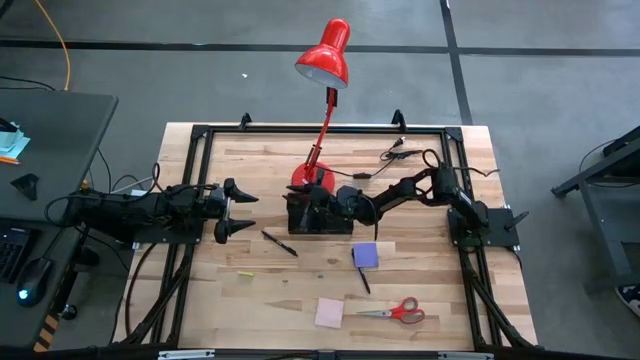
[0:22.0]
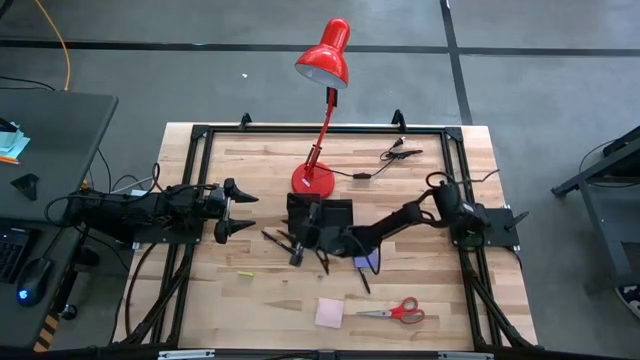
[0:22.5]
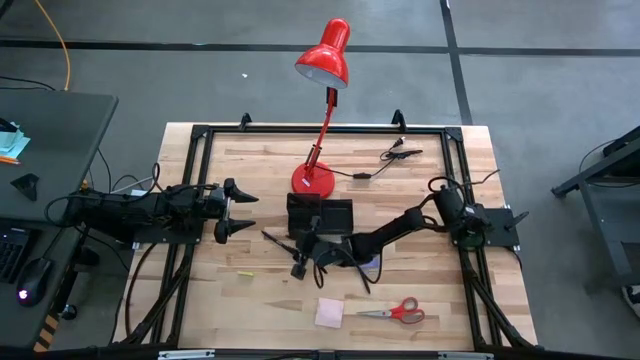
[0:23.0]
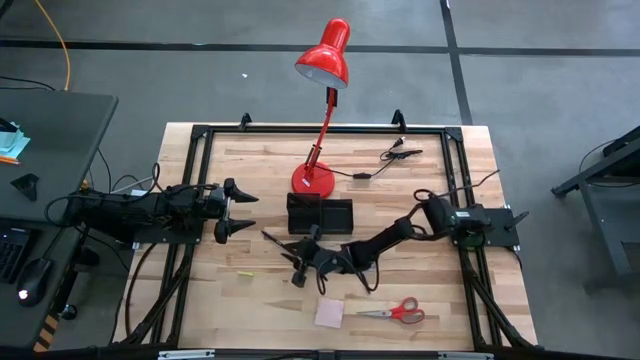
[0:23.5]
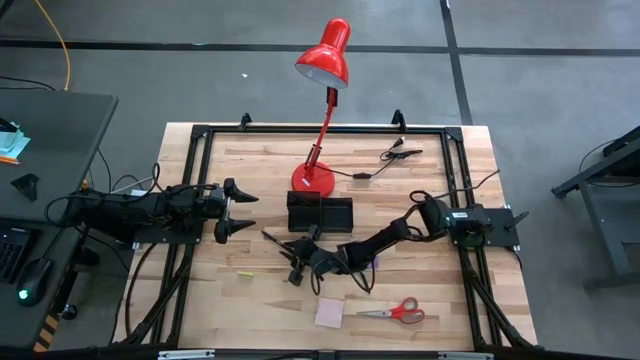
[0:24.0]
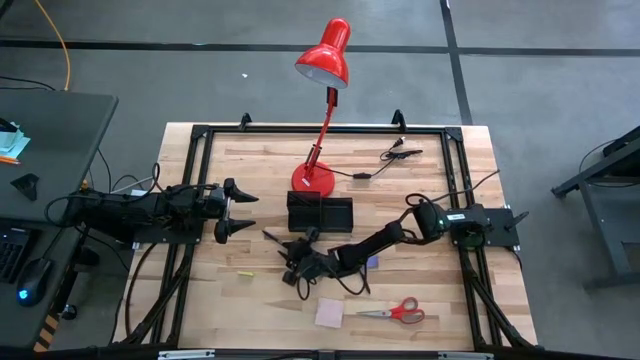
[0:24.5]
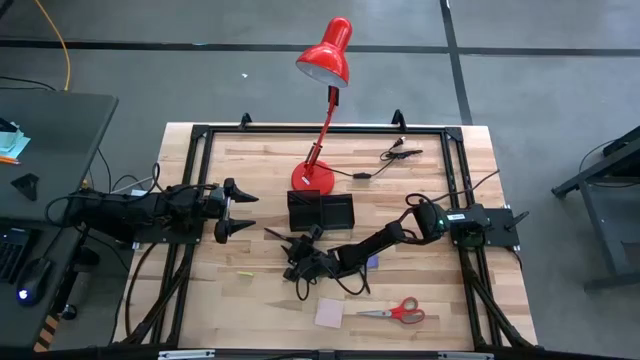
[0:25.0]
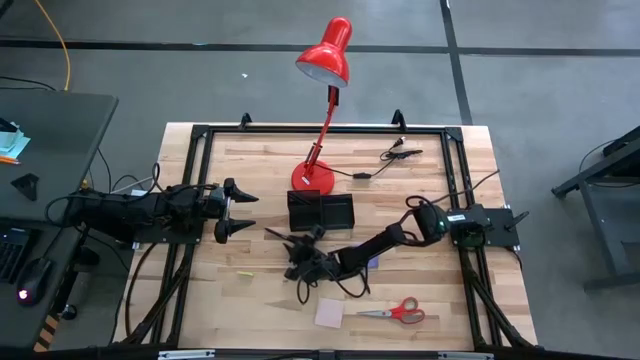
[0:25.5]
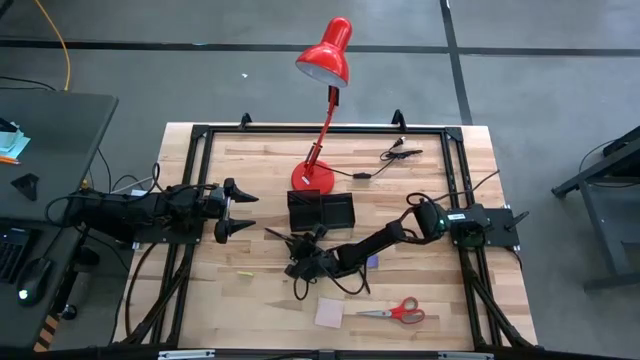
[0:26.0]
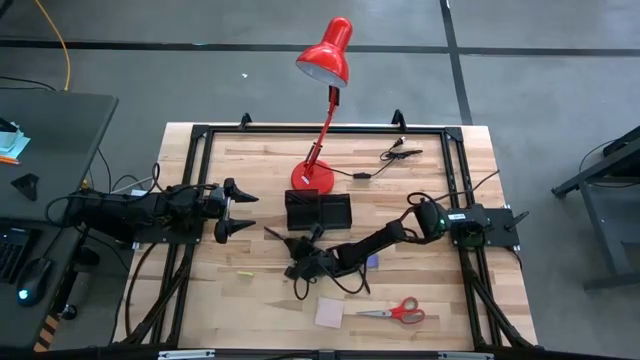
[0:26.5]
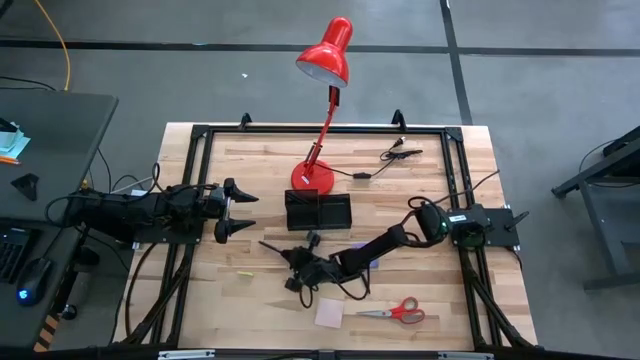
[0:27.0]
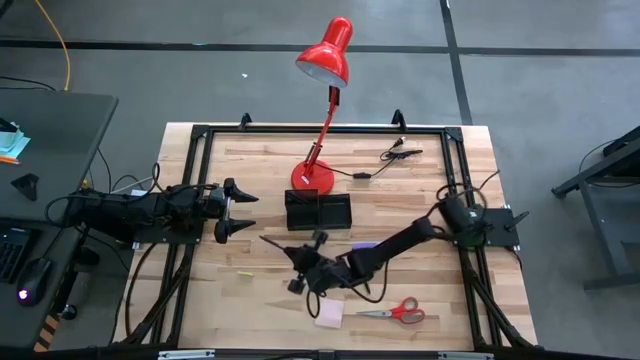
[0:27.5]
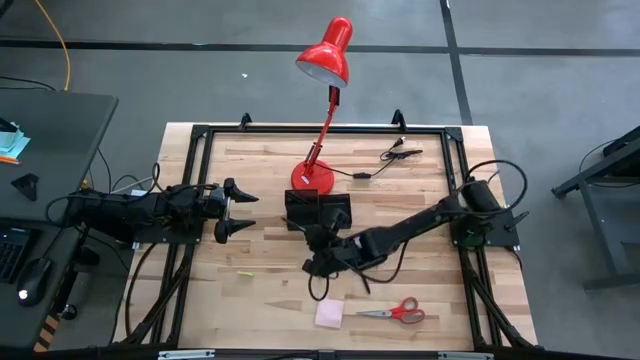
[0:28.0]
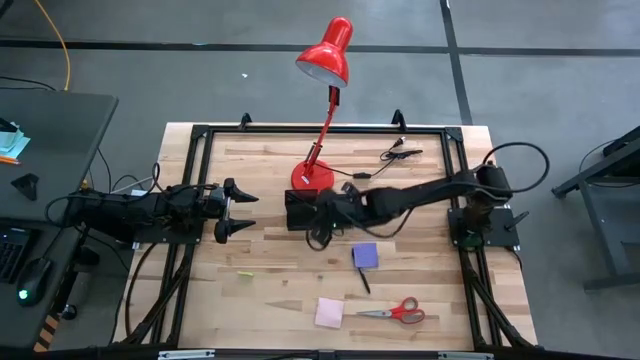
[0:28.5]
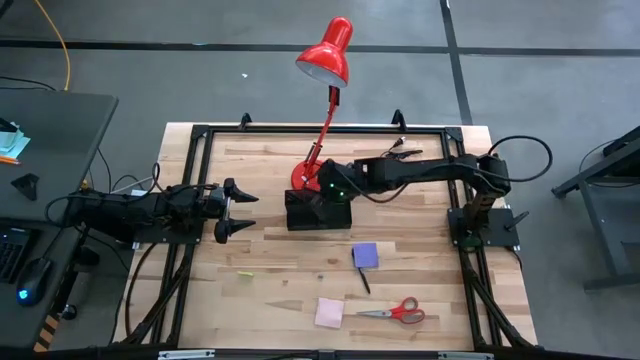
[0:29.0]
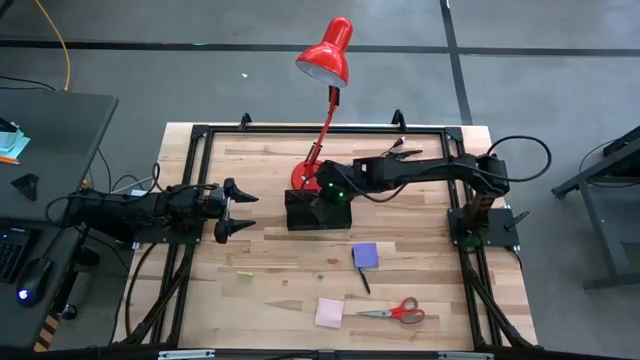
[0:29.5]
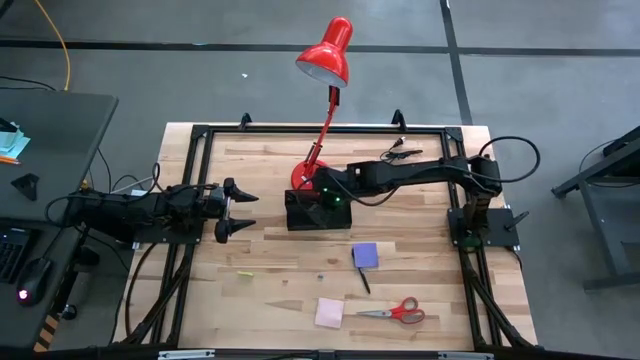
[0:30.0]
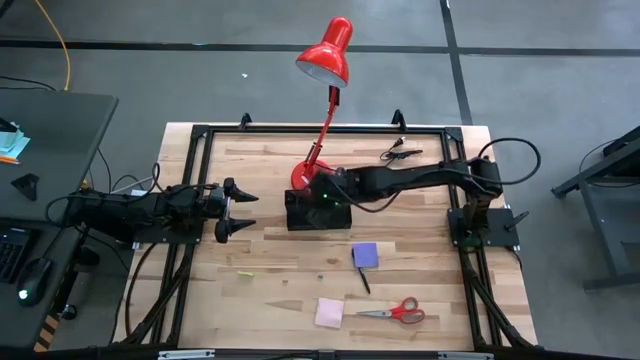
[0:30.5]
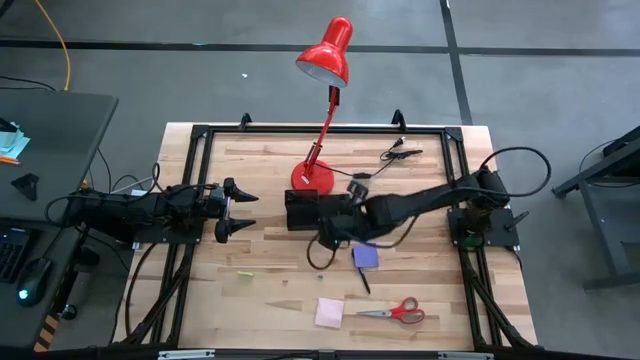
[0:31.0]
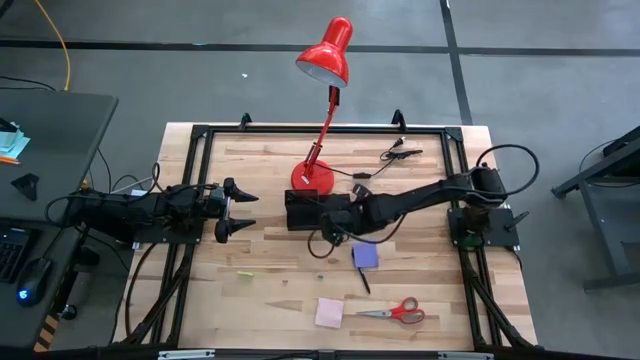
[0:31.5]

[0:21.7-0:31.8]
Task: Pick and place office supplies into organizer
Put the black pen into the black desk organizer

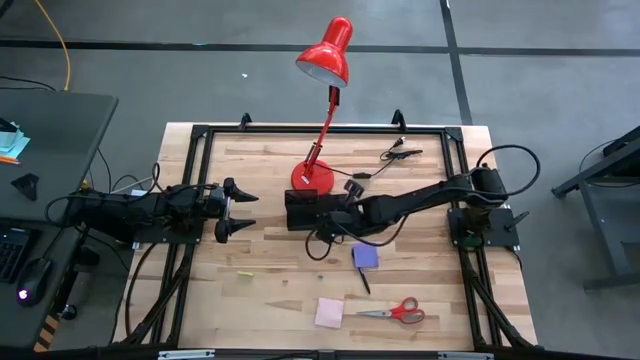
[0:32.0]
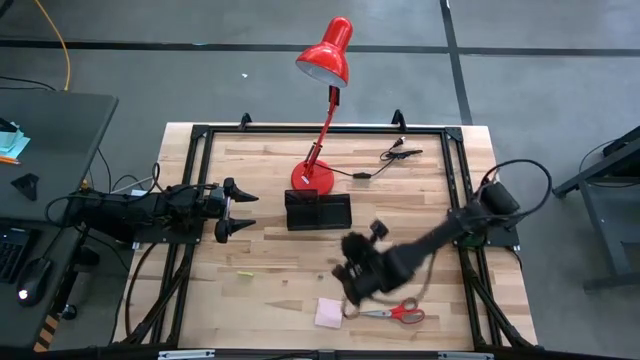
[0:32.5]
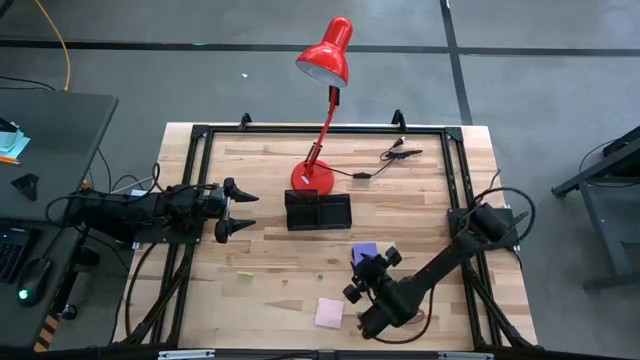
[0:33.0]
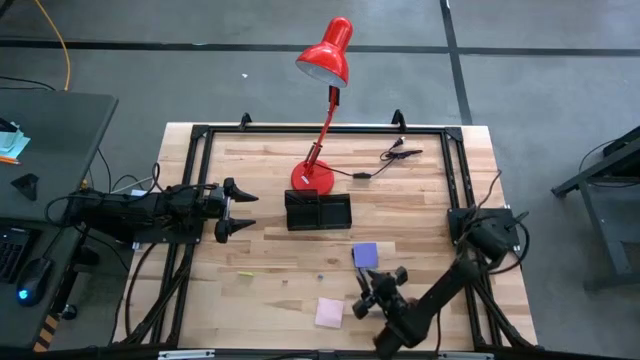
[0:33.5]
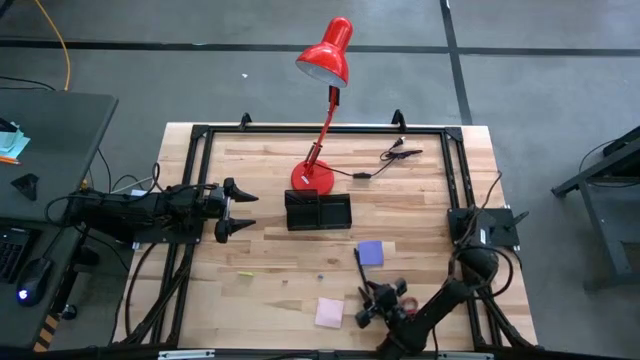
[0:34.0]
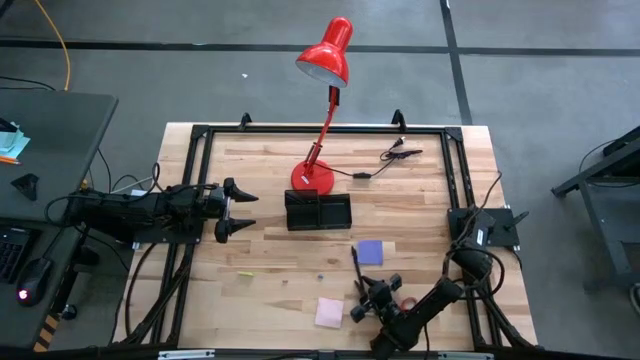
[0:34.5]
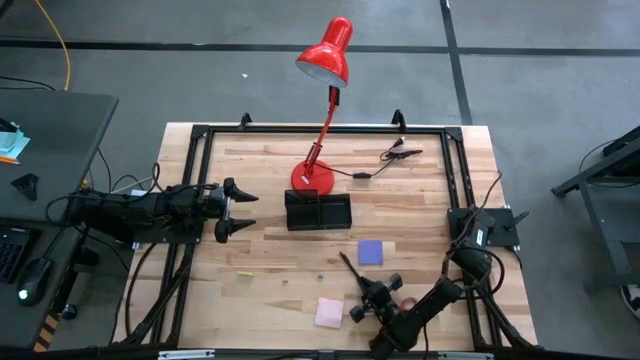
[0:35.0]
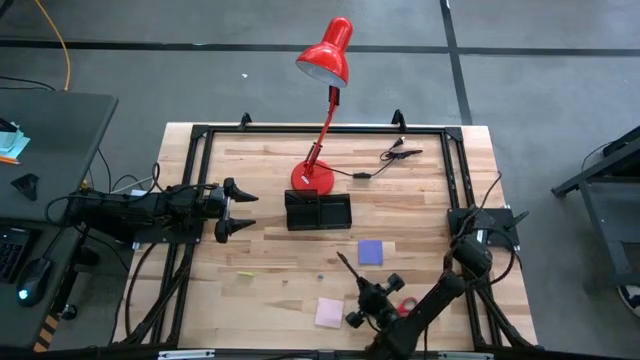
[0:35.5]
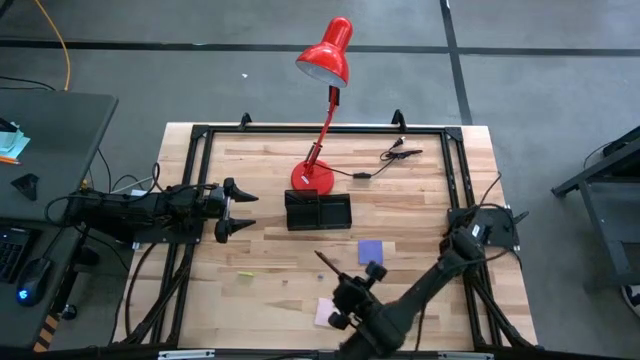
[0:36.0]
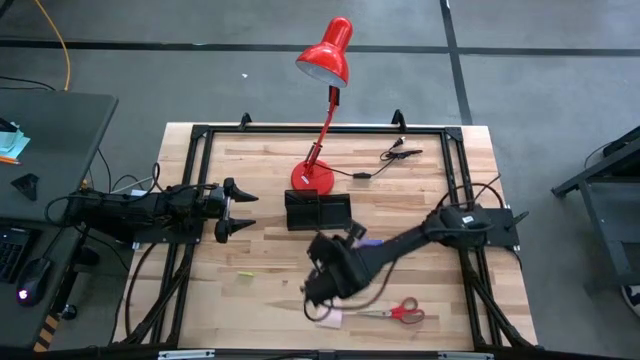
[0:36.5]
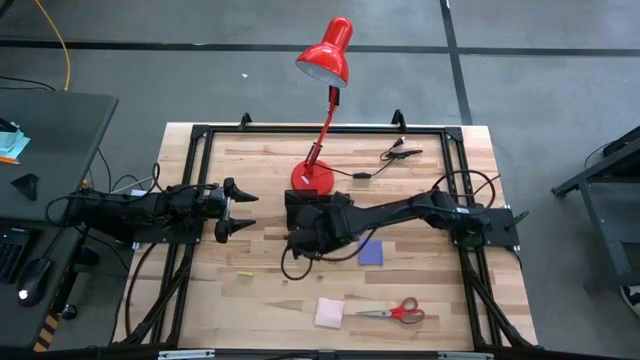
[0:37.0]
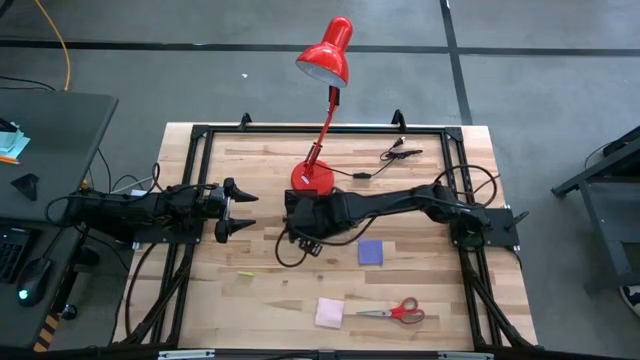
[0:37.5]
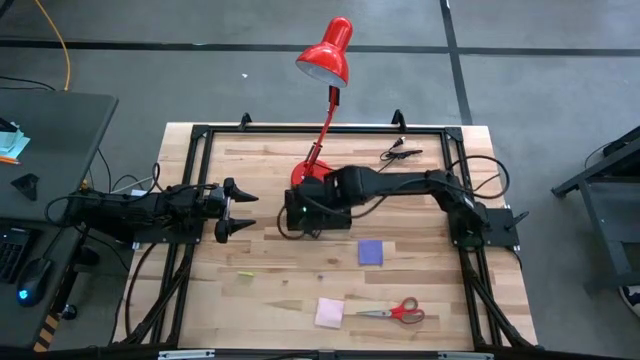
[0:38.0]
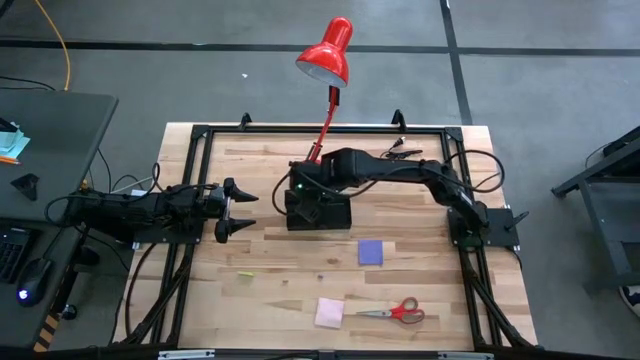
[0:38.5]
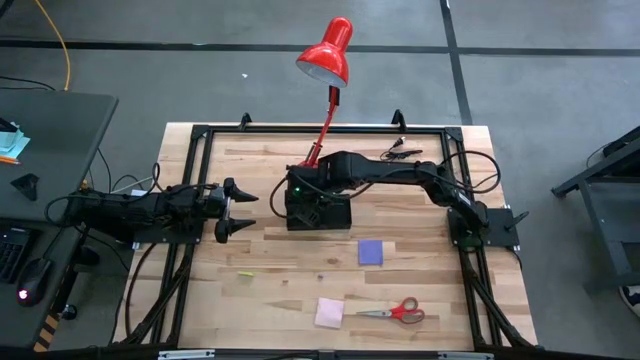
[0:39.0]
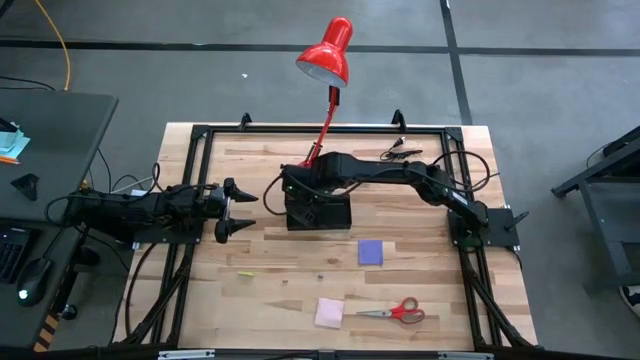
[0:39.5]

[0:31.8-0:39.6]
Put the black pen into the black desk organizer

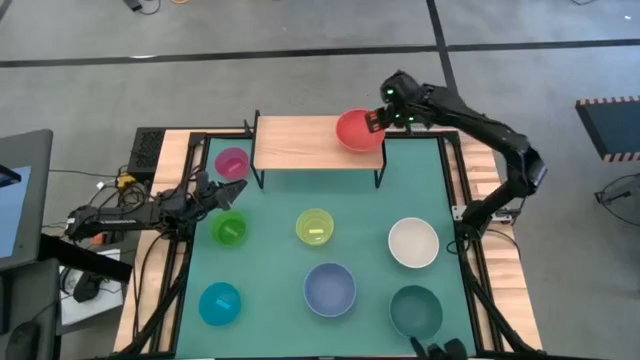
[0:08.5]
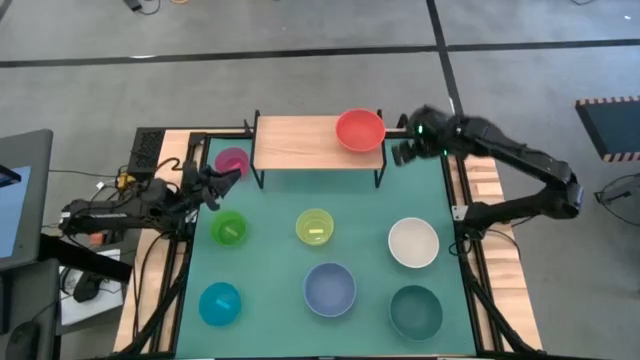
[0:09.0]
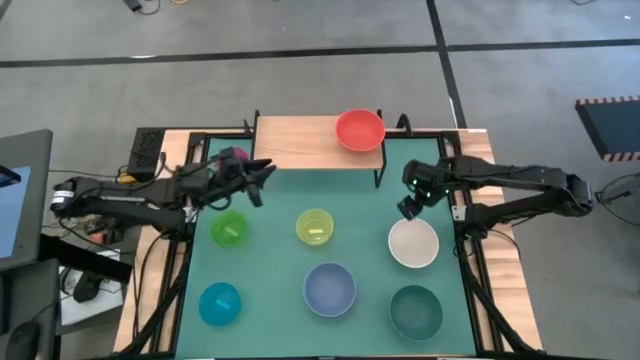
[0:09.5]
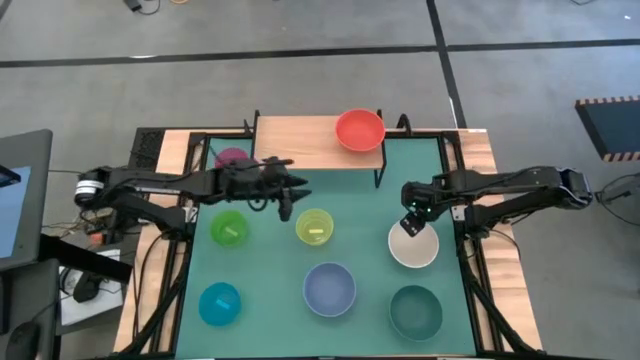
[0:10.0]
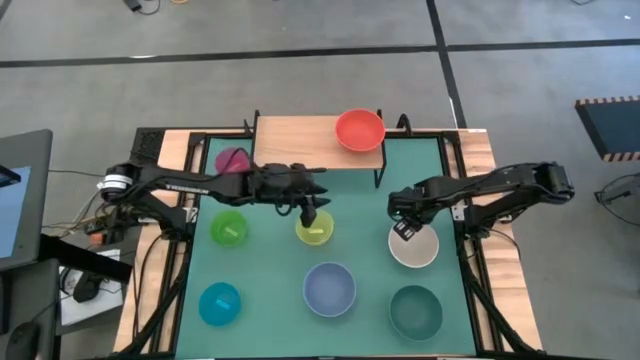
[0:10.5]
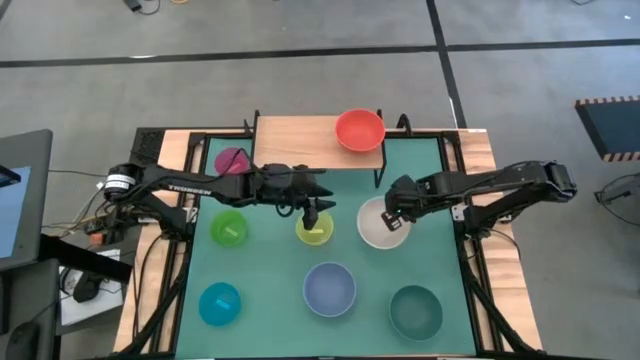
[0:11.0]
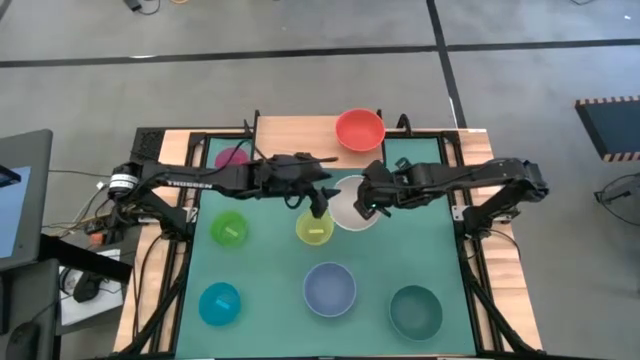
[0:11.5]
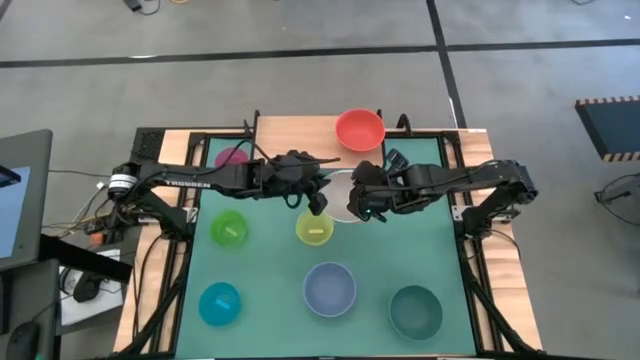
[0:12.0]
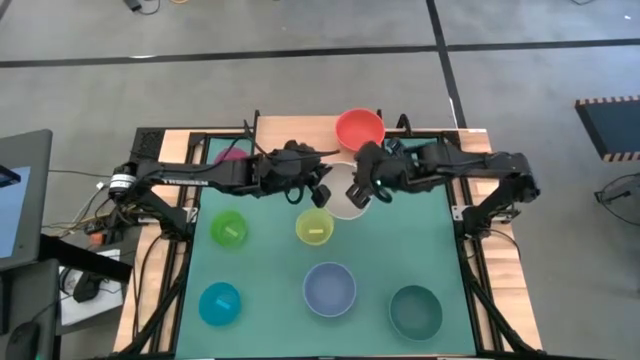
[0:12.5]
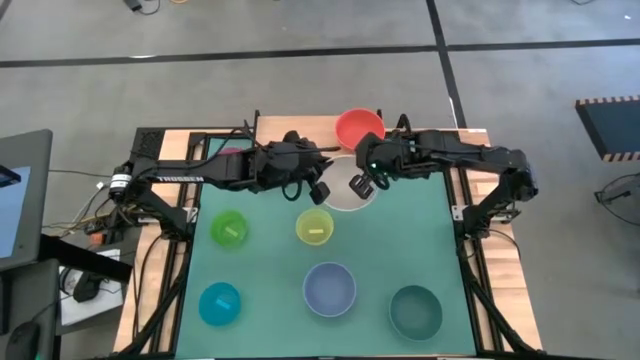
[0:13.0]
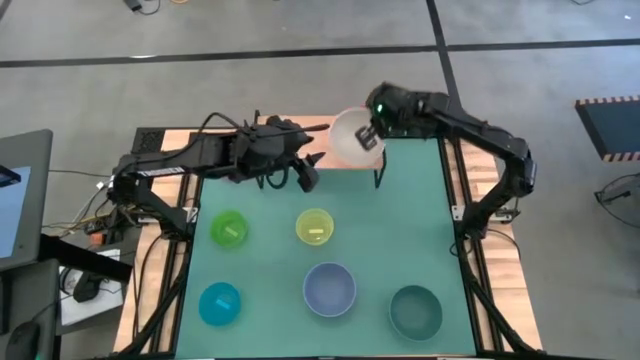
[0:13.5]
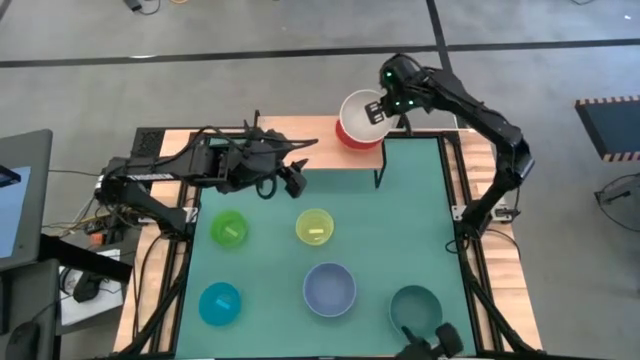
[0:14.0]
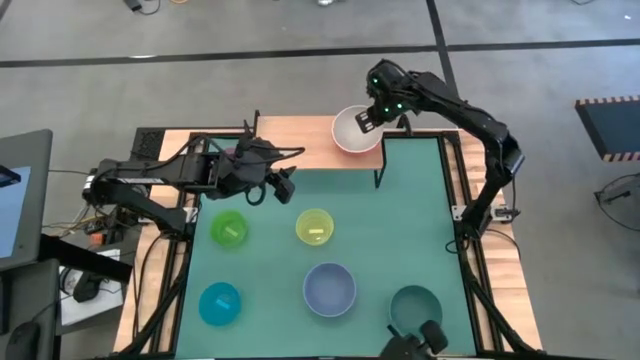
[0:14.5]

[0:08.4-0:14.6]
Task: Place and stack bowls onto a shelf
Stack the white bowl on the orange bowl on the shelf
